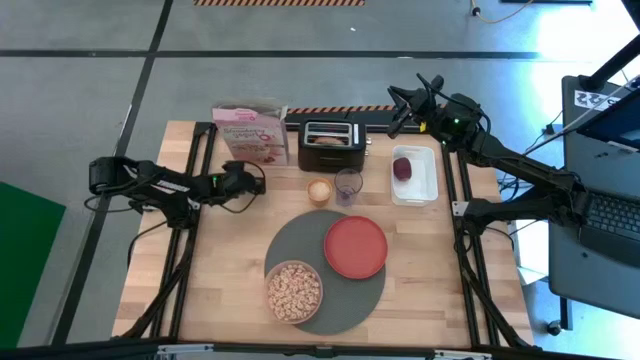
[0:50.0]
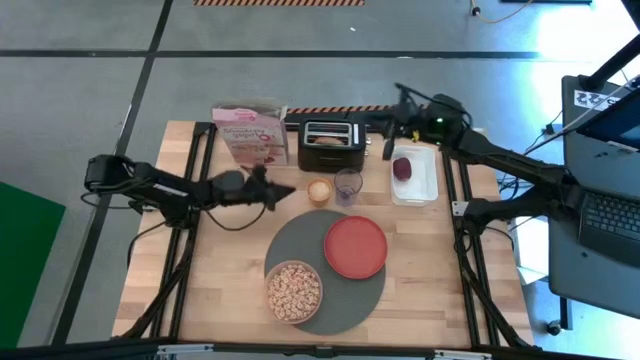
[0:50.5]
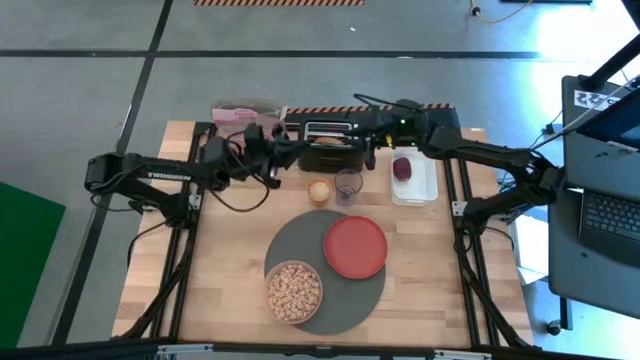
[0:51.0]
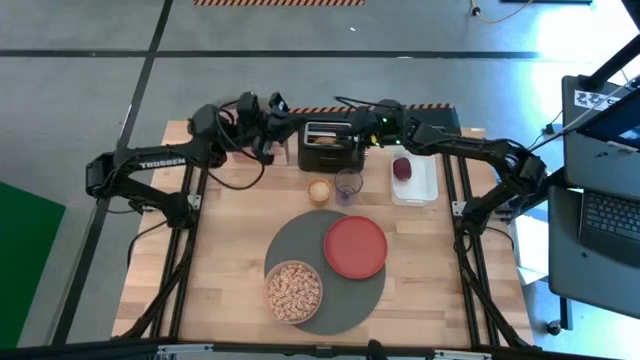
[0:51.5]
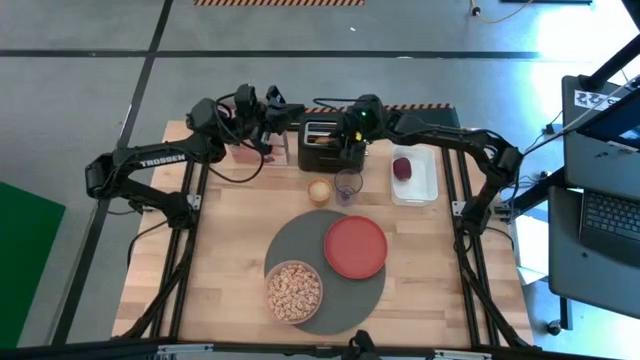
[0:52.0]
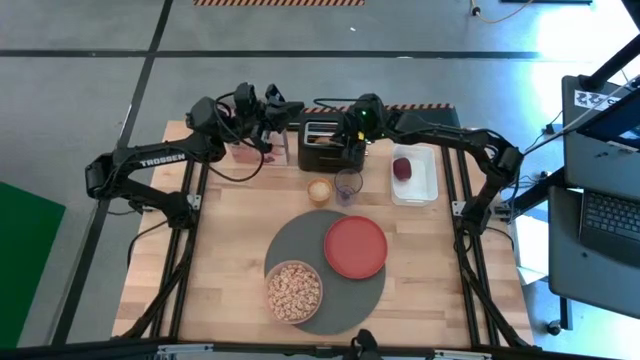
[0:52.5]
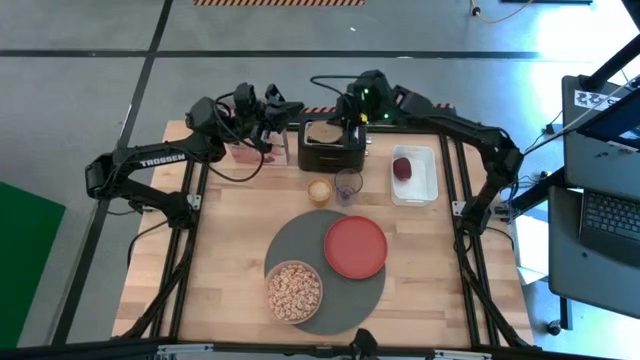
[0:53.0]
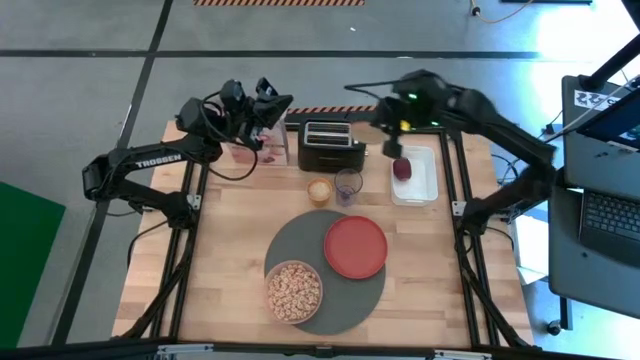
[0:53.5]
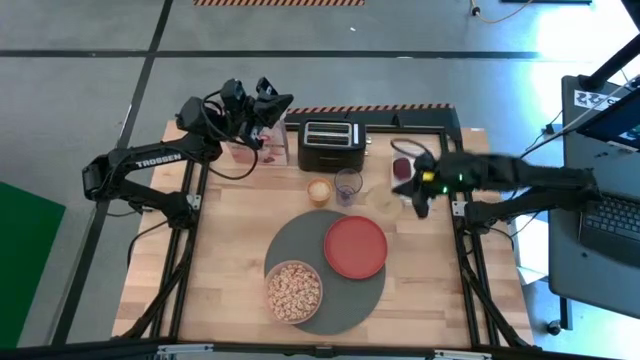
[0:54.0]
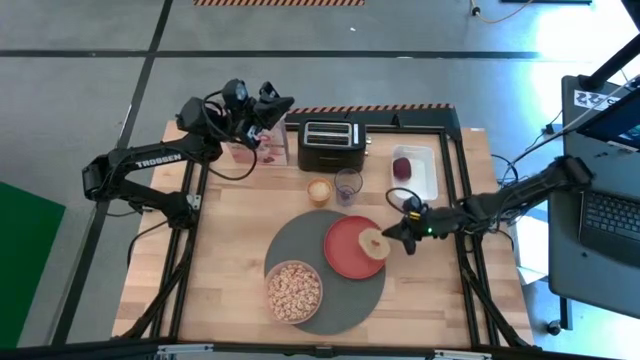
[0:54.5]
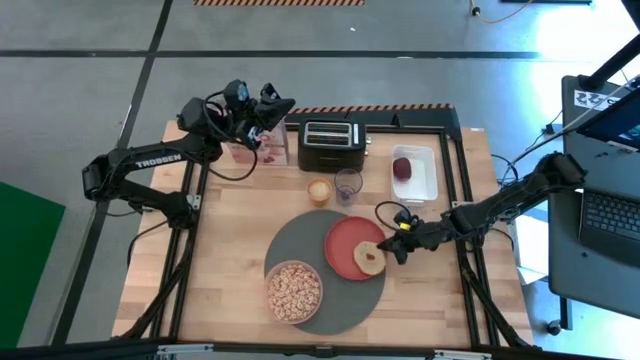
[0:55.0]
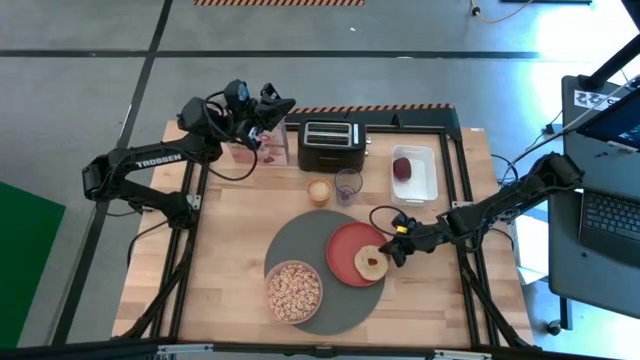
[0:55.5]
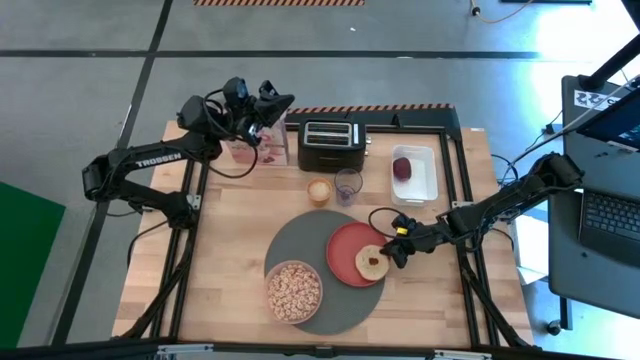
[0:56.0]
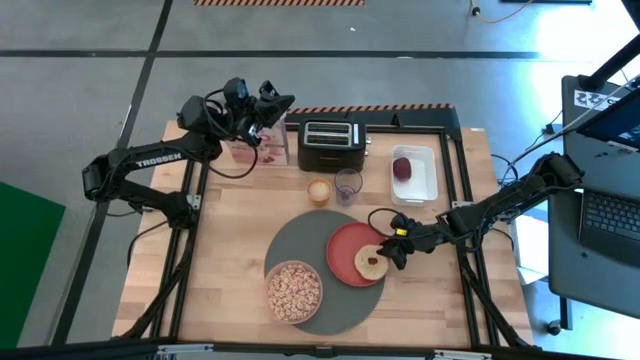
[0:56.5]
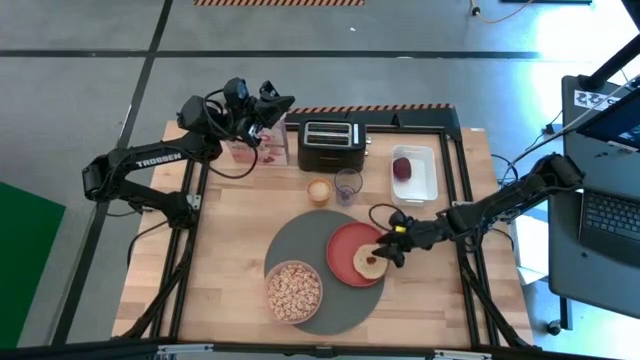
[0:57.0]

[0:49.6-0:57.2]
Task: Arrange a breakfast setting
Put the toasted bagel on the red plate

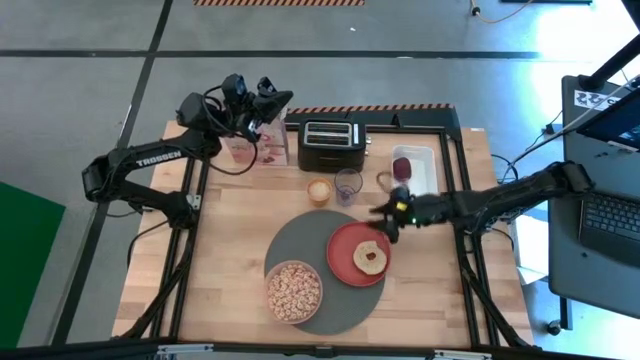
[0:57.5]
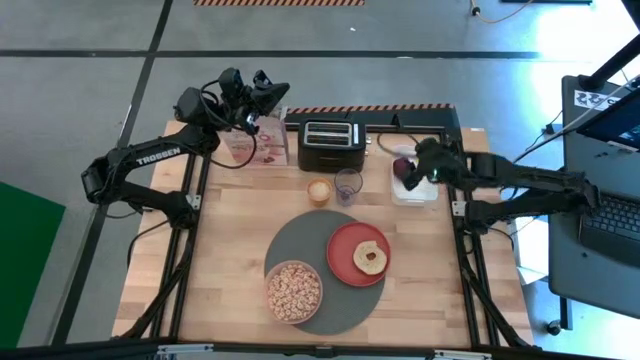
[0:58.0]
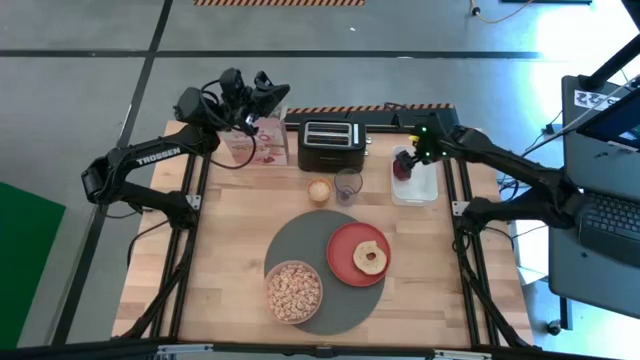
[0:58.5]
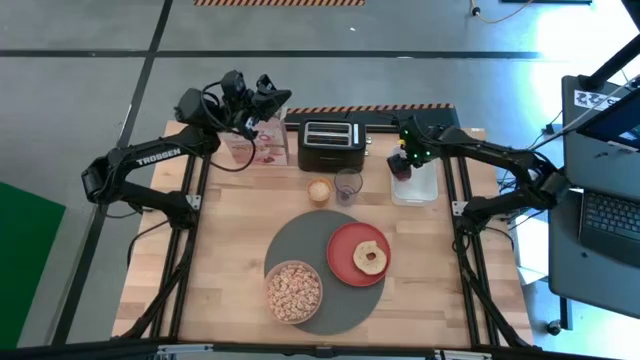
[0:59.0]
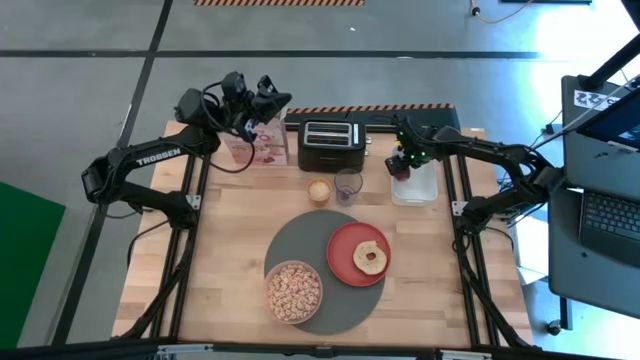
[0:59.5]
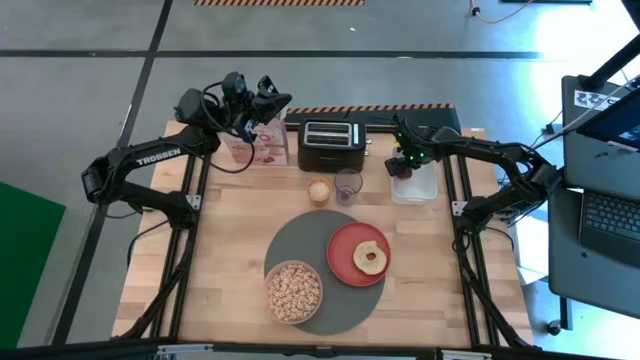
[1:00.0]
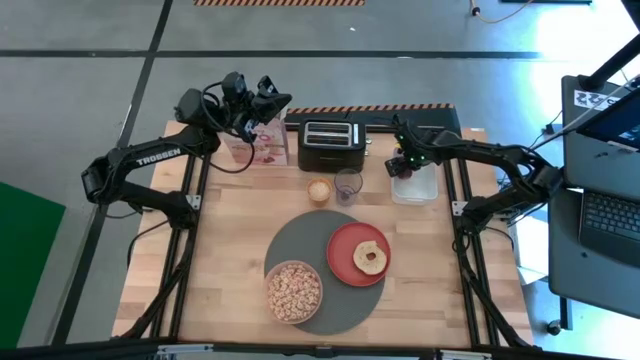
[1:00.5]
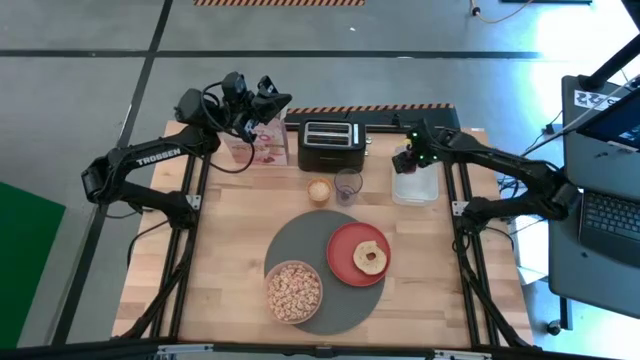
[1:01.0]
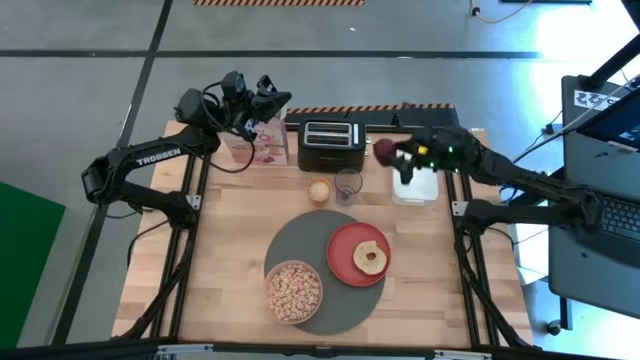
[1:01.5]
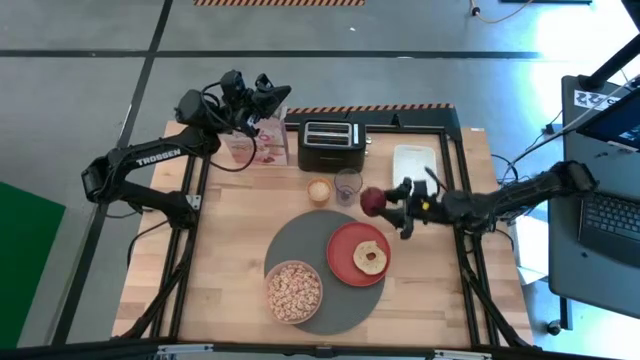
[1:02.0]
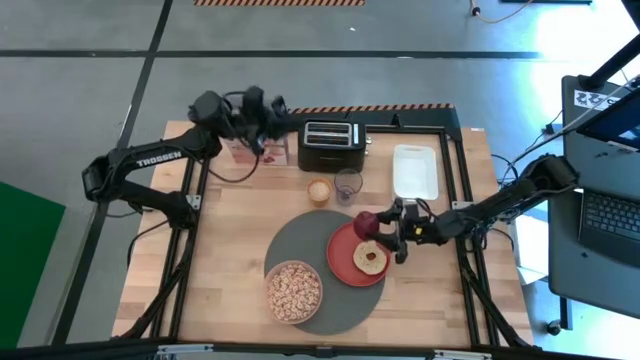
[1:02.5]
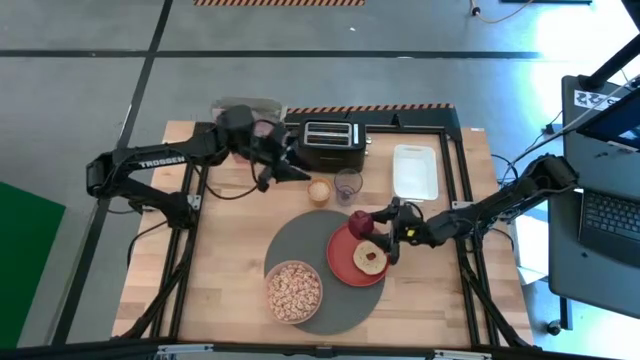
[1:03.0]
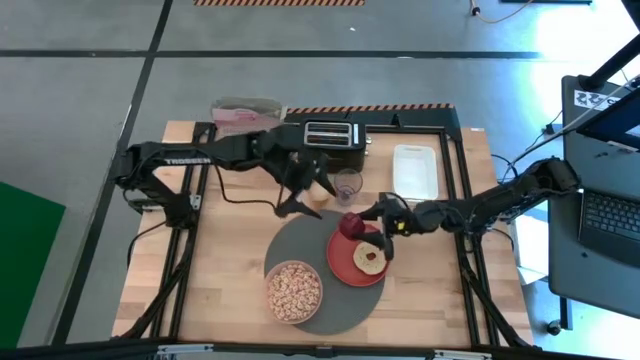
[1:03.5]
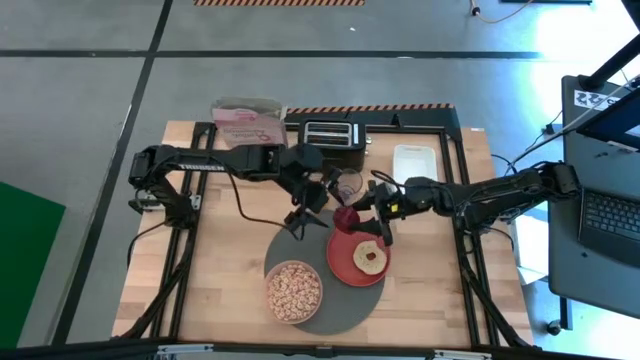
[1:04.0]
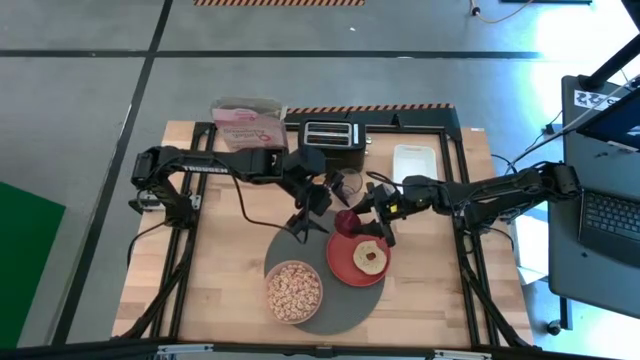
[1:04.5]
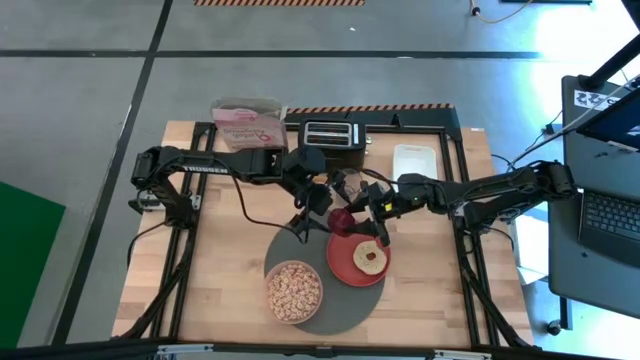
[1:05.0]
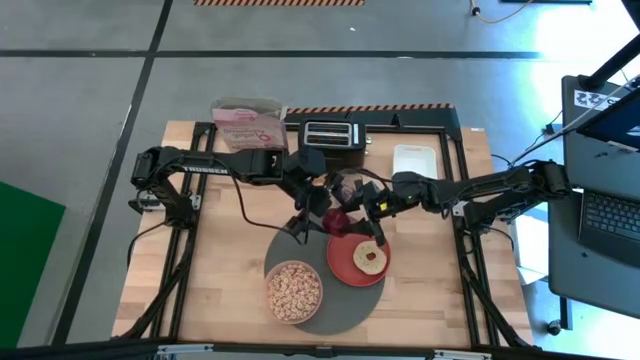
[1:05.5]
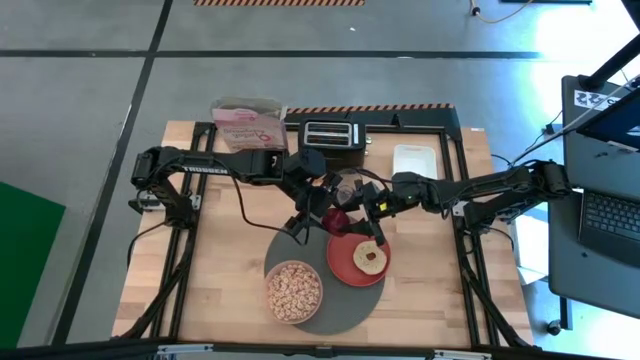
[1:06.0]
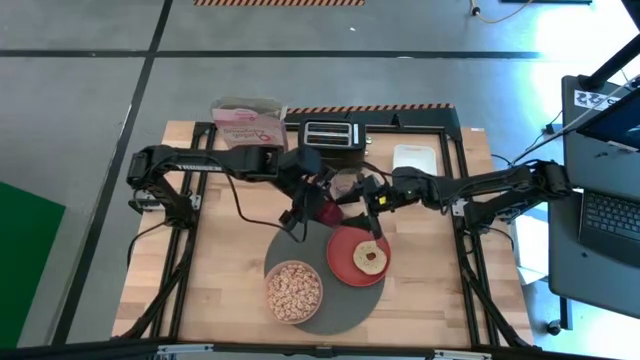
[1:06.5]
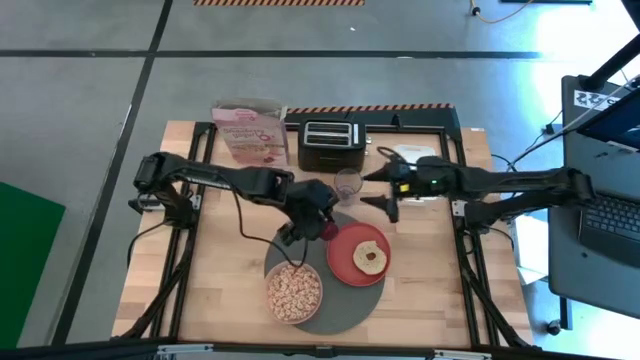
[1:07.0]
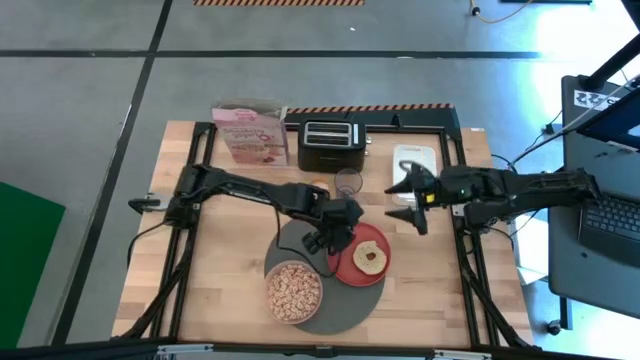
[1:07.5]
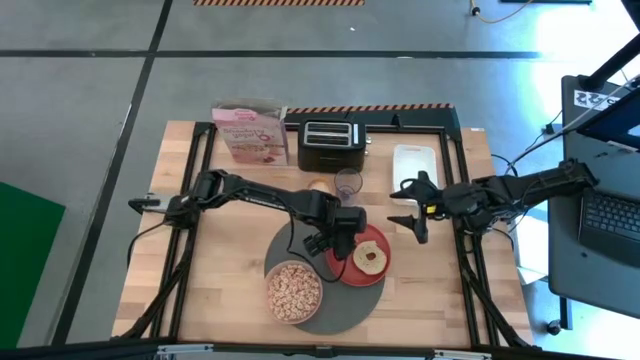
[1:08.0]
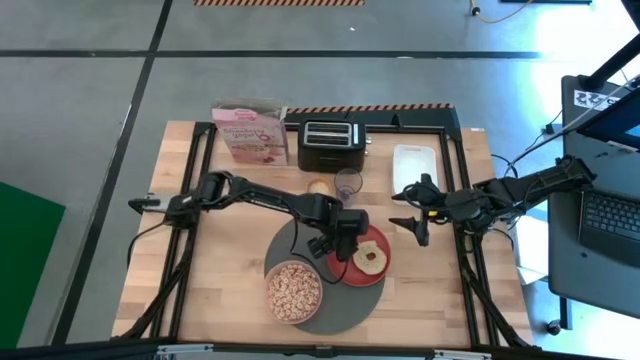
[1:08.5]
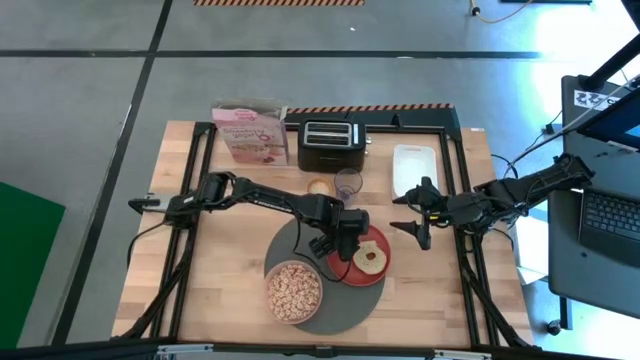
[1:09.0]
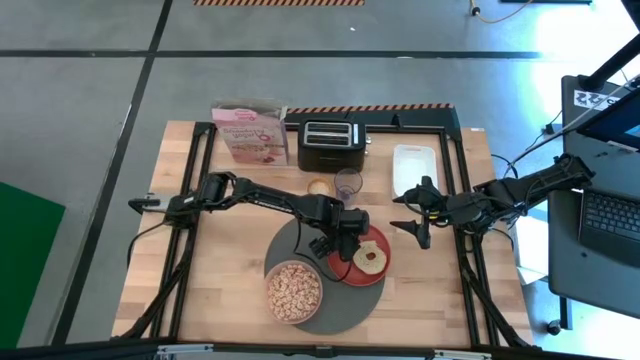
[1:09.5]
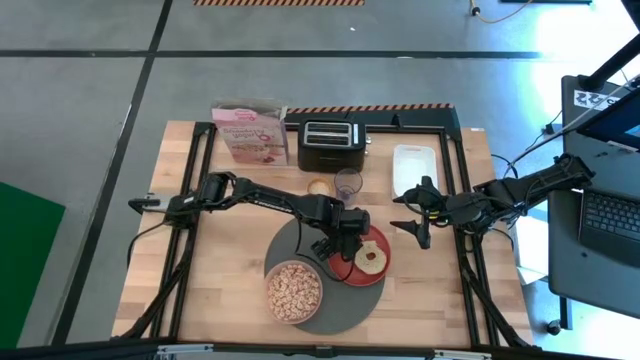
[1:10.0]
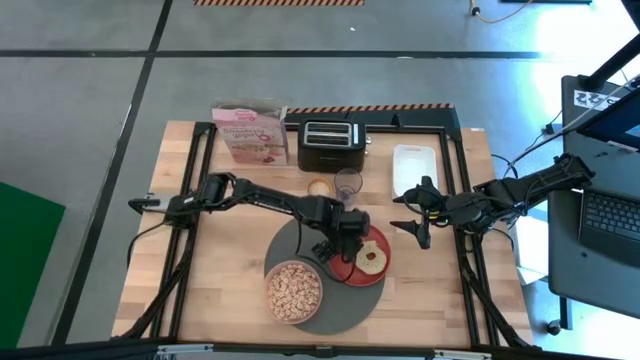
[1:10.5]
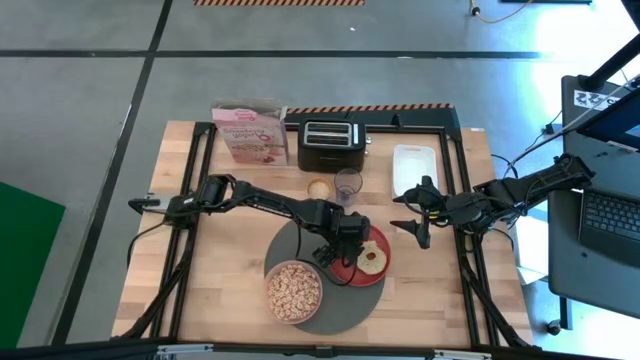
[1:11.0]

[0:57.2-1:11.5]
Put the apple on the red plate
